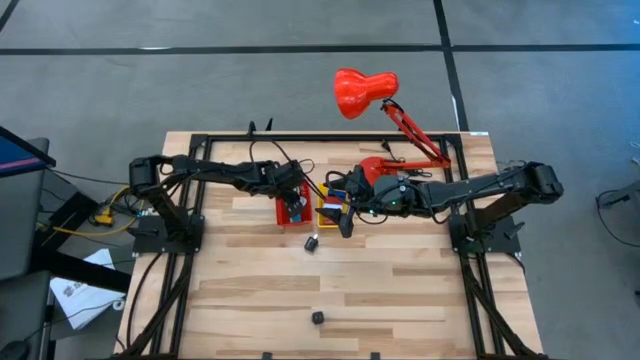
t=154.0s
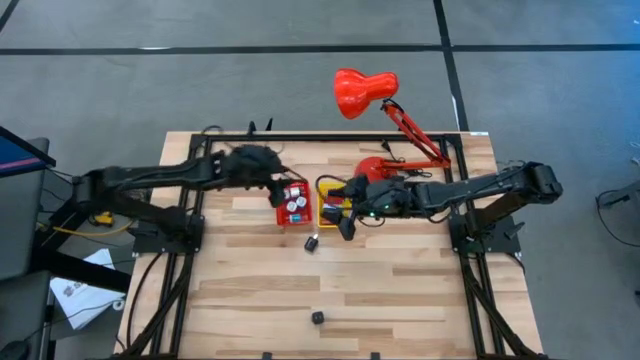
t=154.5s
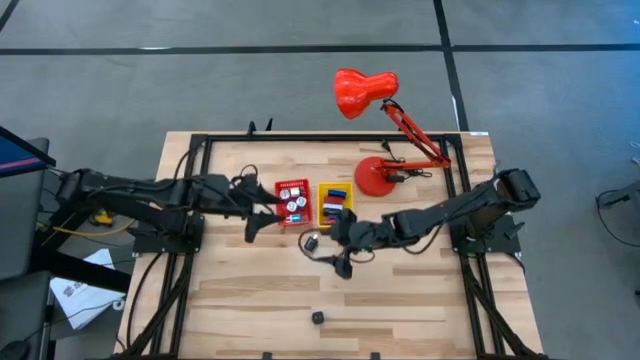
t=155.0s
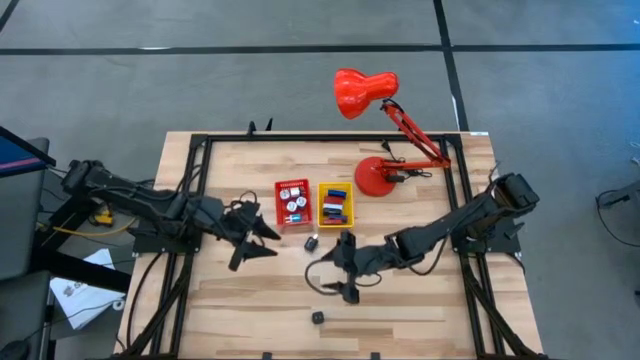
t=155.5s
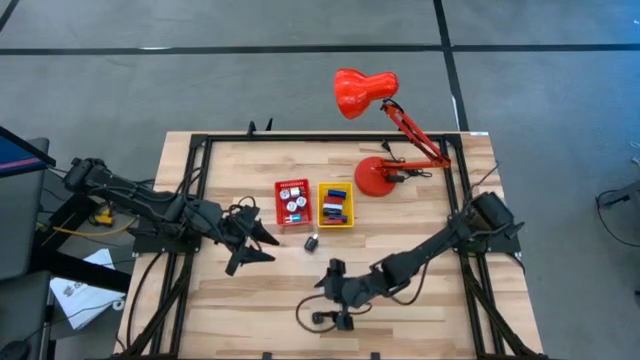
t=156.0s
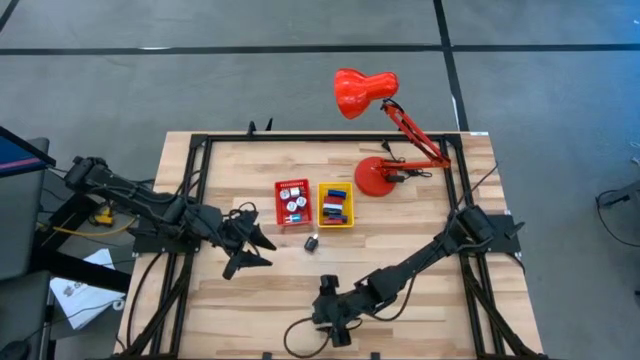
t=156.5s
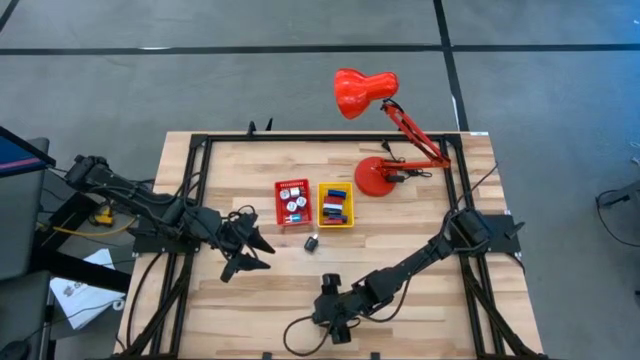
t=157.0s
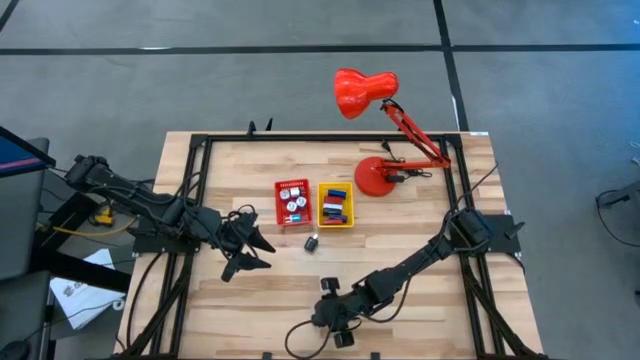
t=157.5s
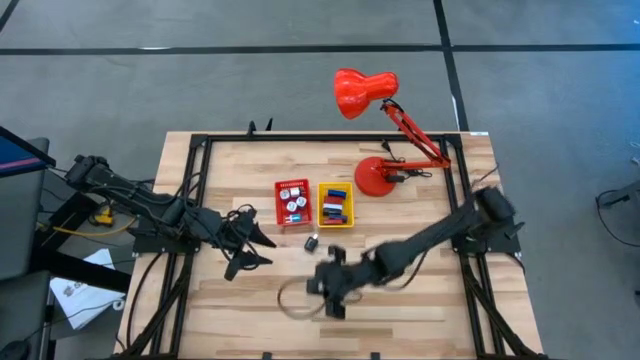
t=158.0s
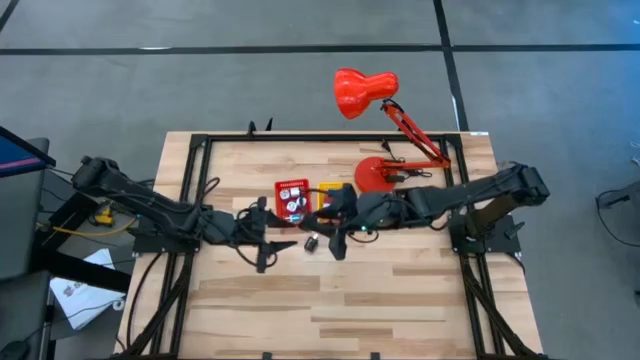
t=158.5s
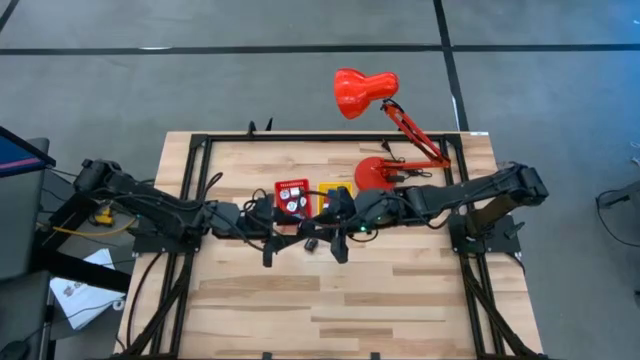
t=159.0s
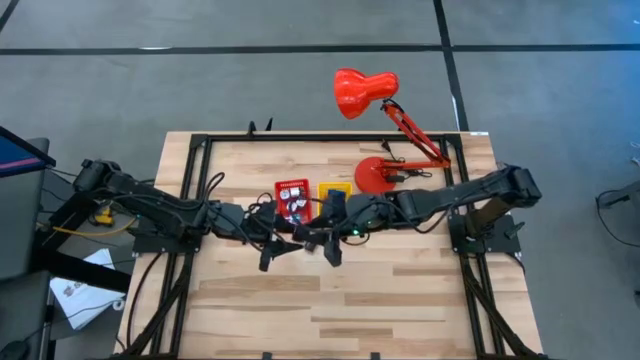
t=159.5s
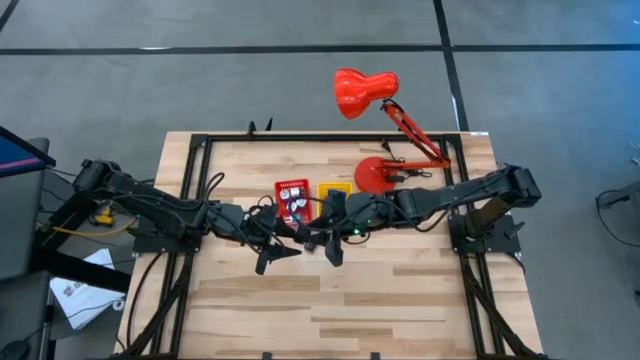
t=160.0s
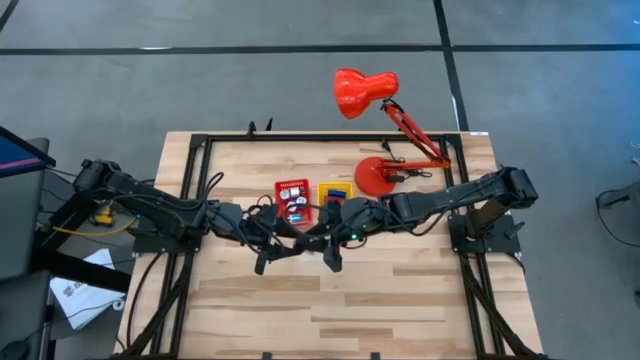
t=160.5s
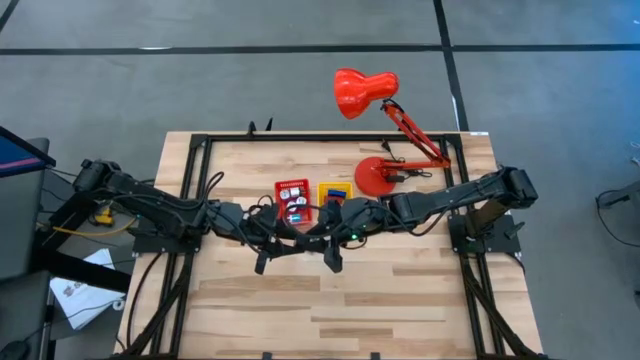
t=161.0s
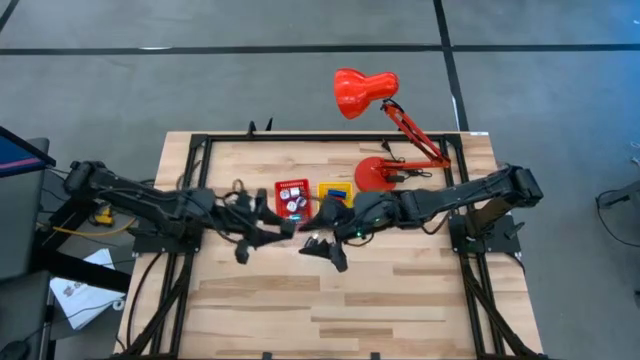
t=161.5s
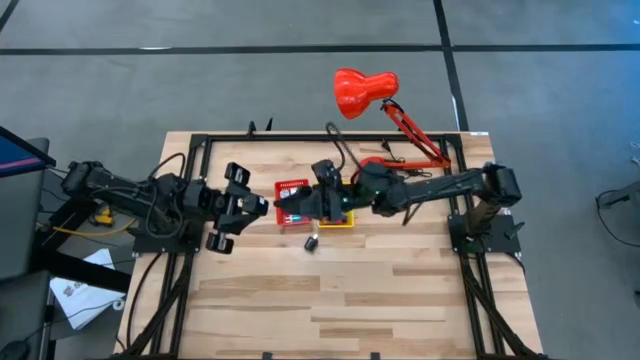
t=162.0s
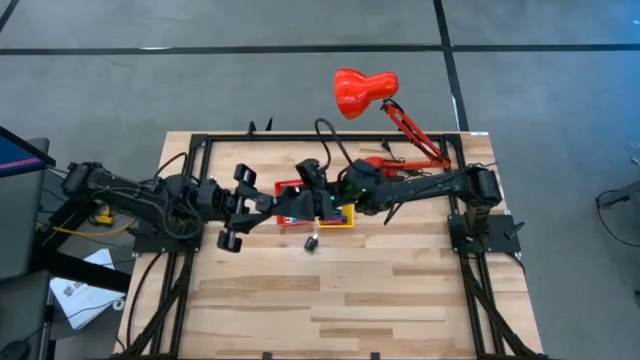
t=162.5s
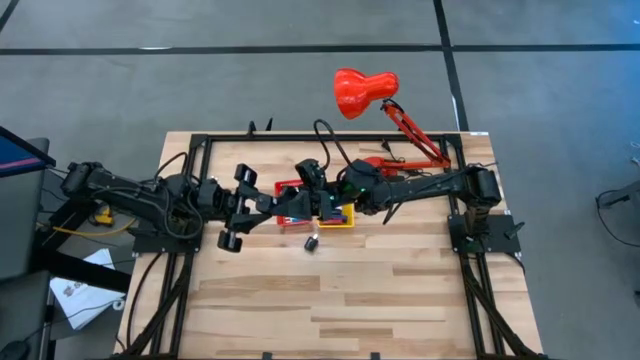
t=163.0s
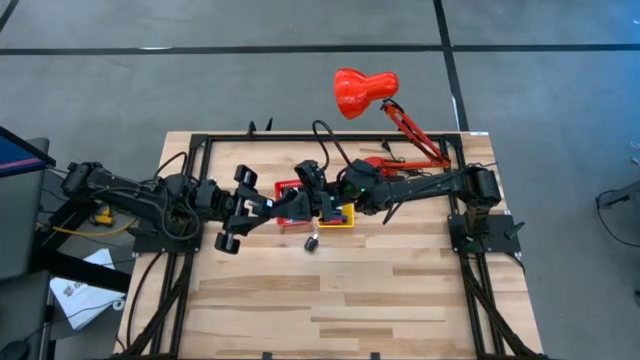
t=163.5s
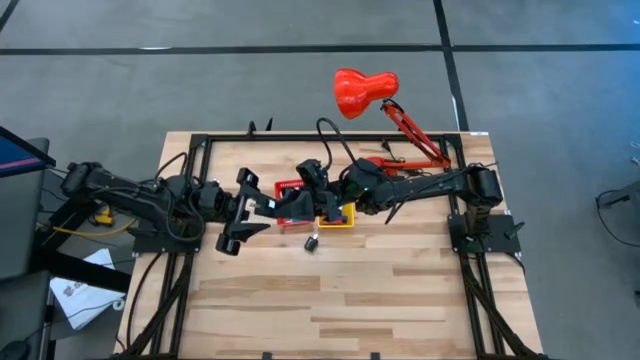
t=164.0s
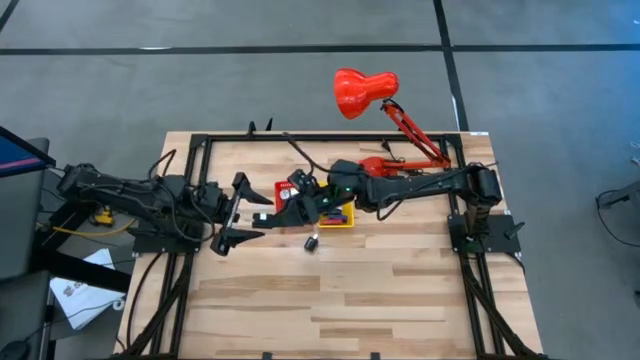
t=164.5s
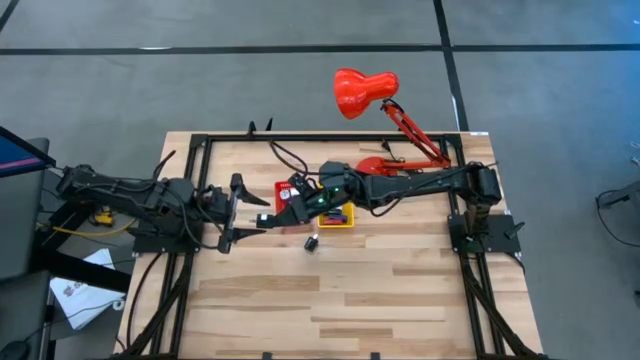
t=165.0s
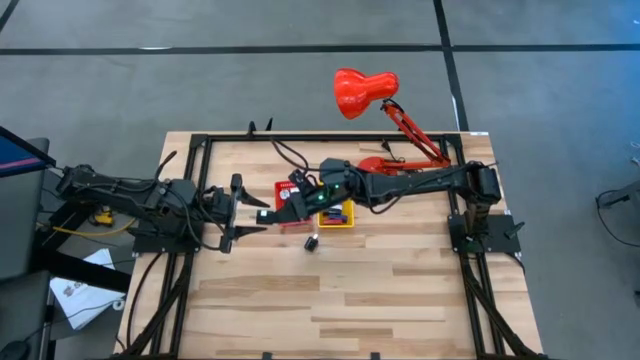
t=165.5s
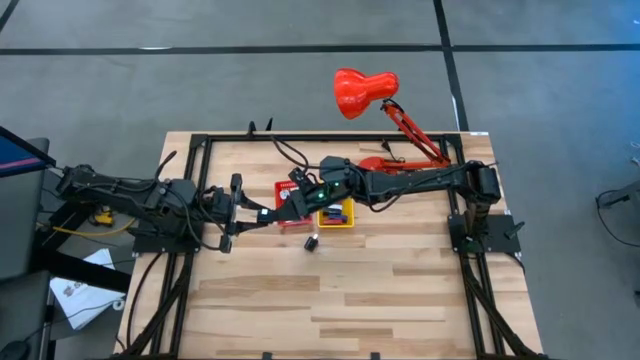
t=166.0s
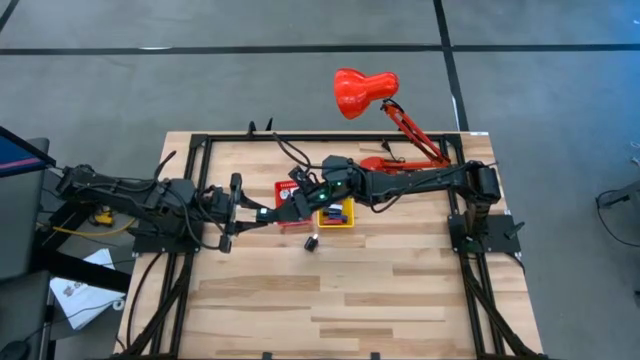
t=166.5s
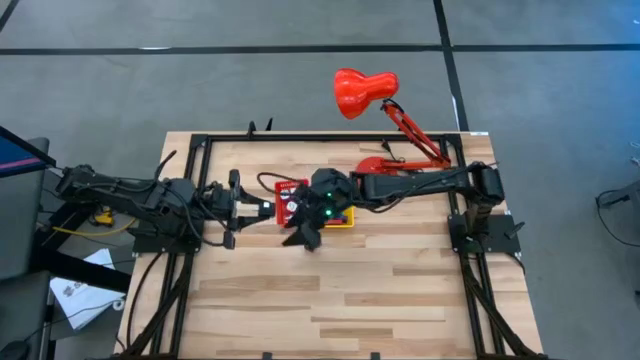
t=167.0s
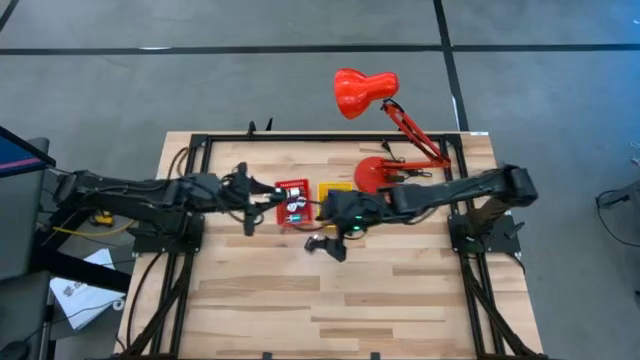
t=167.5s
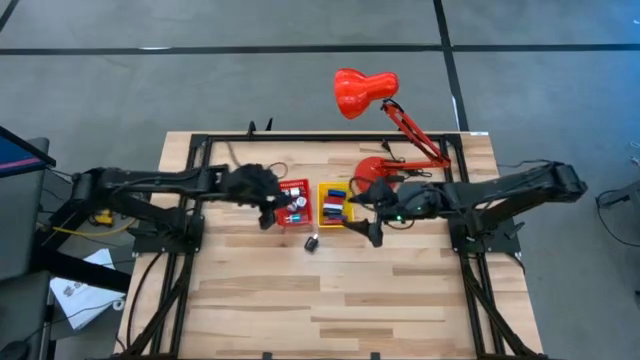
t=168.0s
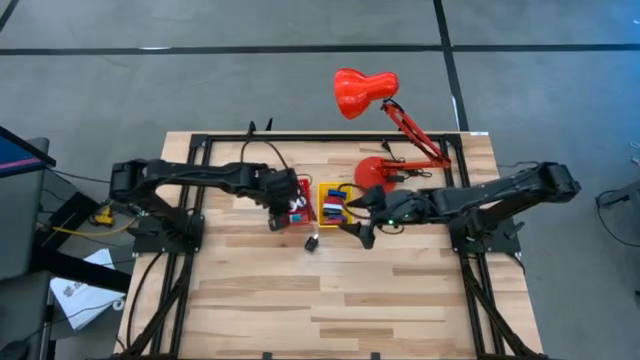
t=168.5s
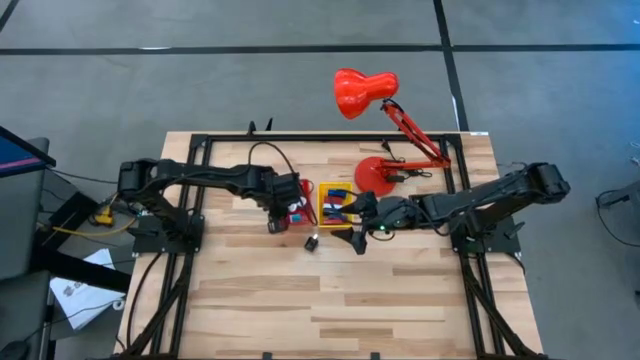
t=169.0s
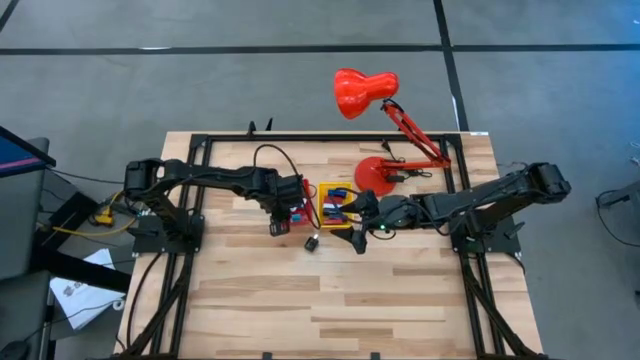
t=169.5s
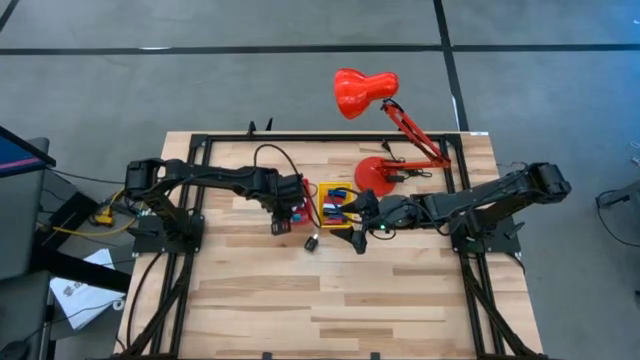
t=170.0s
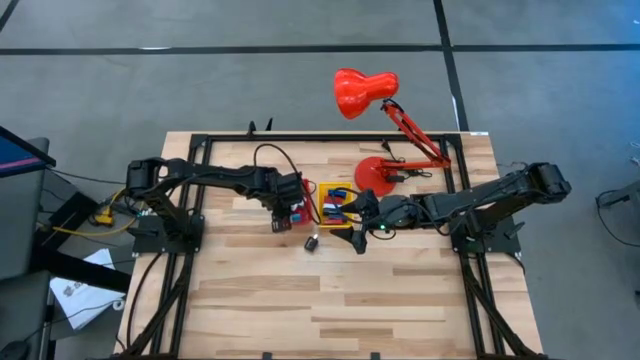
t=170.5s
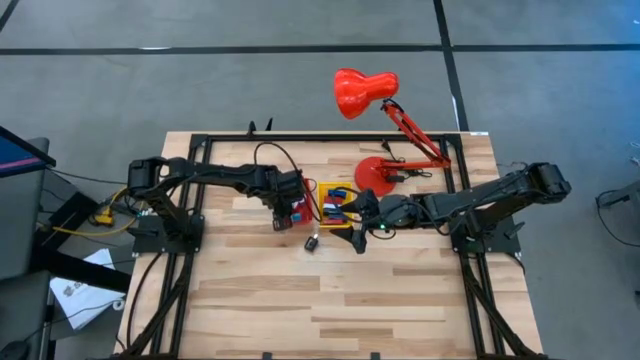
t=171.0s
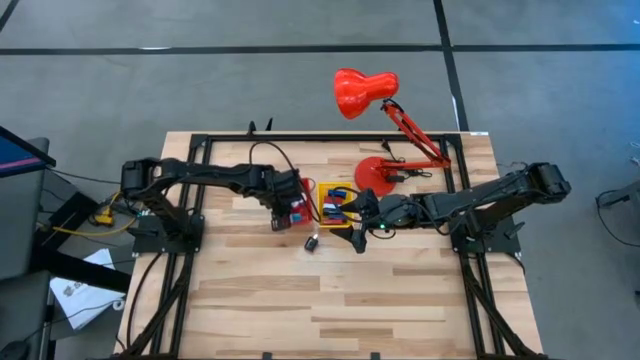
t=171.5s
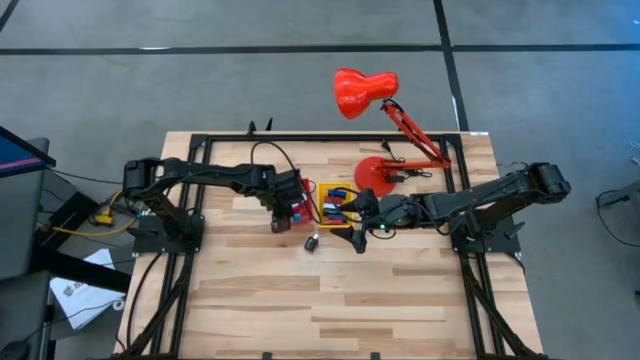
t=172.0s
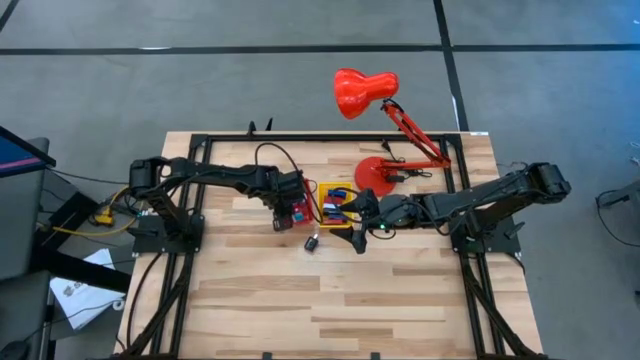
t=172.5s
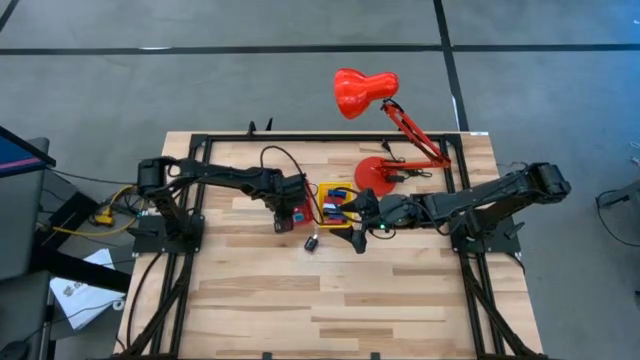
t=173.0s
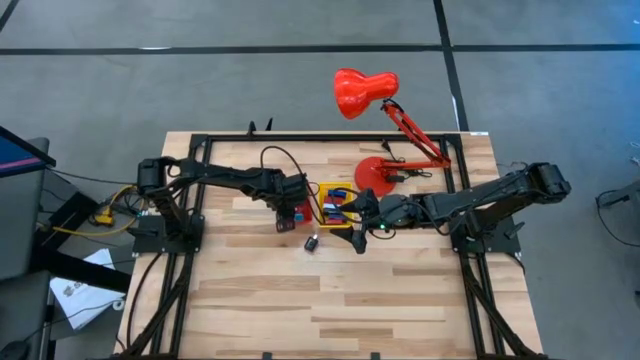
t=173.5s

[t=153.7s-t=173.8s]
Task: Pick & Place Office items
Put the bottom black charger adapter into the red basket

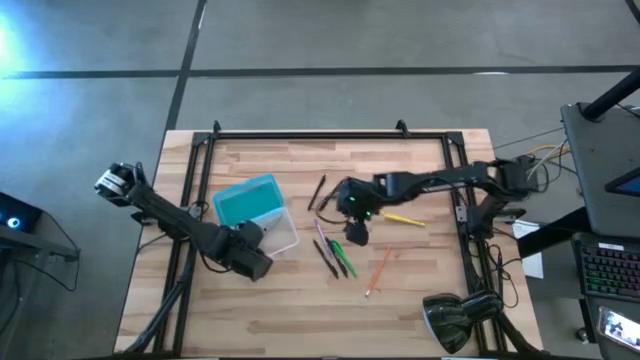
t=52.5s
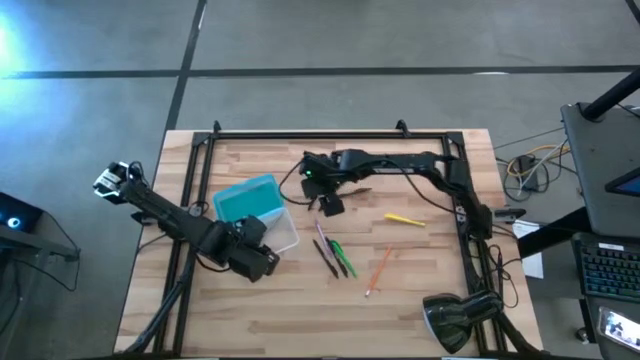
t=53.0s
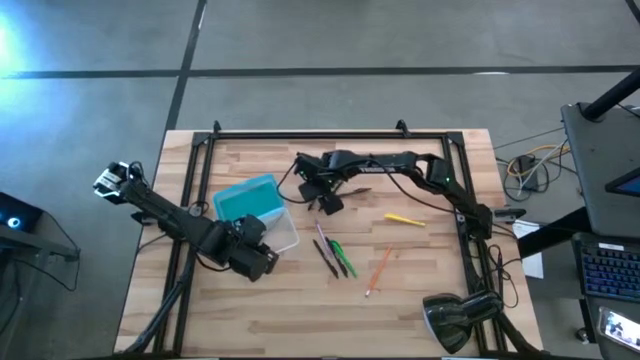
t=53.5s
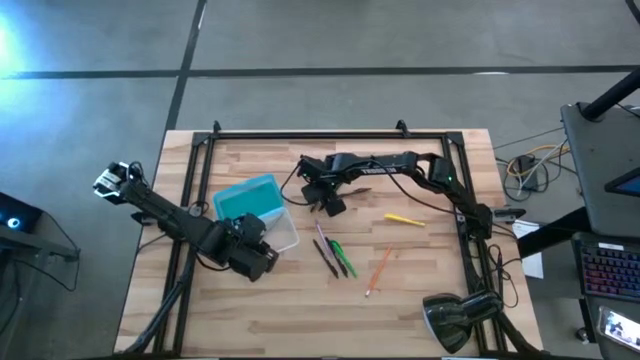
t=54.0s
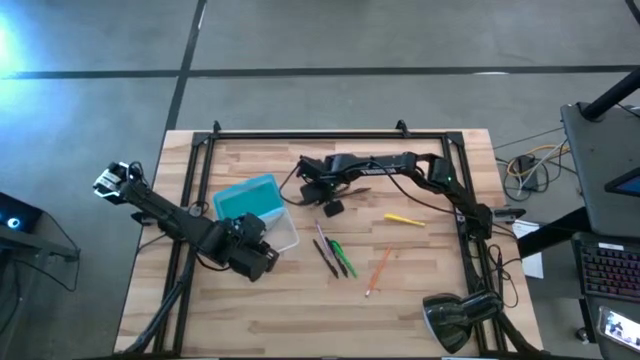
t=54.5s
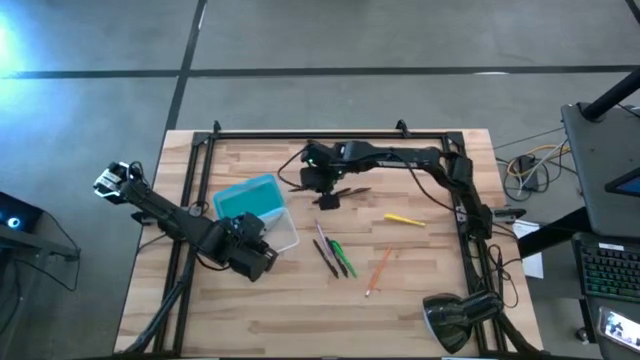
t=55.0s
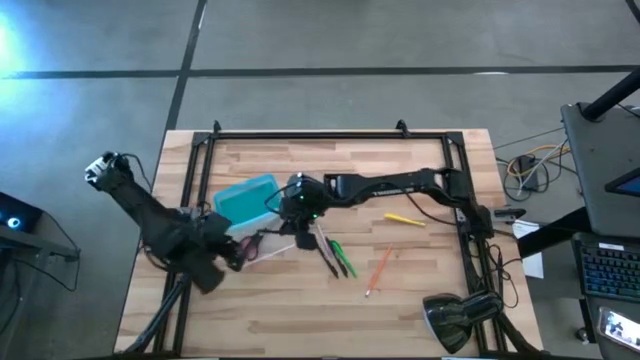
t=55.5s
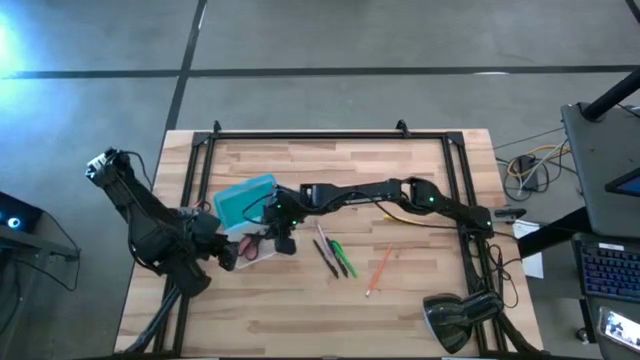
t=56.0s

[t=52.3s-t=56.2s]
Task: Pick & place school supplies into a supply box
Put the black pen into the blue supply box
